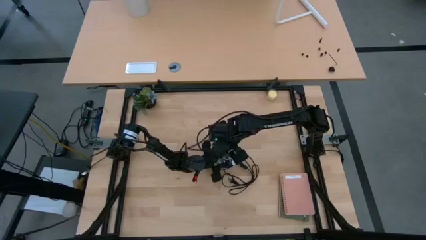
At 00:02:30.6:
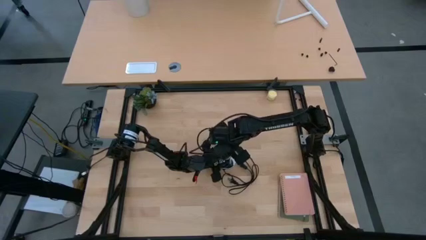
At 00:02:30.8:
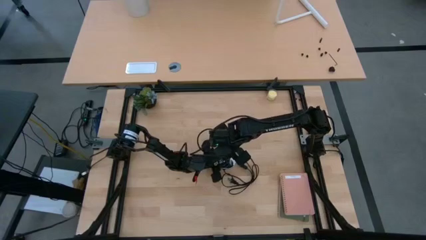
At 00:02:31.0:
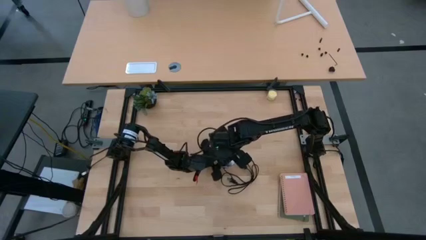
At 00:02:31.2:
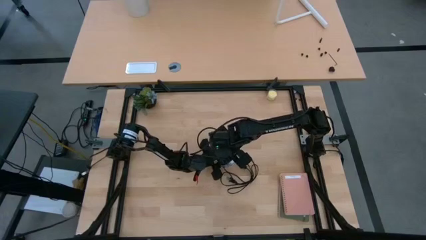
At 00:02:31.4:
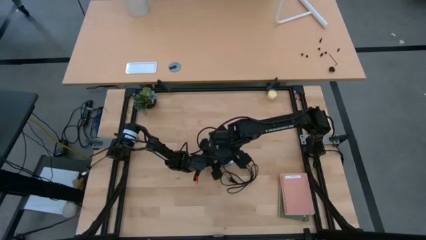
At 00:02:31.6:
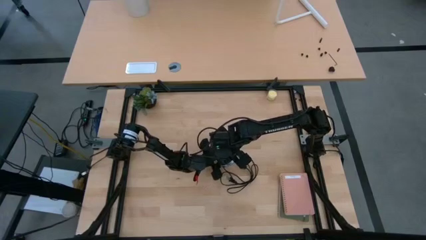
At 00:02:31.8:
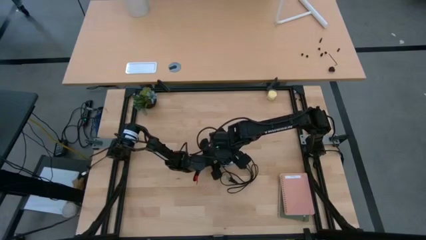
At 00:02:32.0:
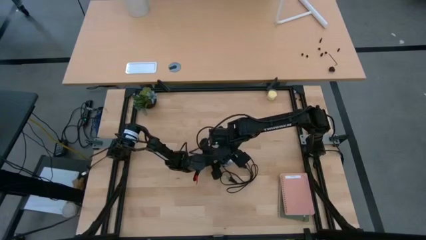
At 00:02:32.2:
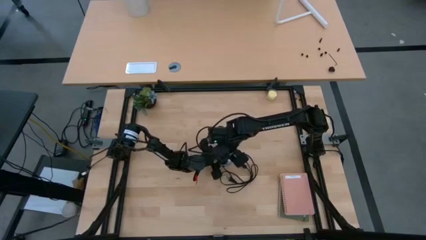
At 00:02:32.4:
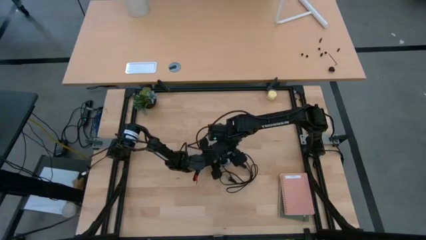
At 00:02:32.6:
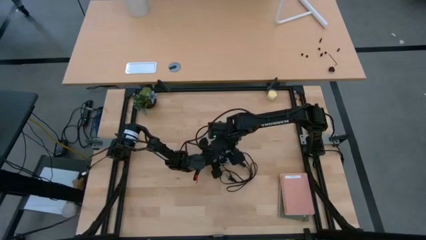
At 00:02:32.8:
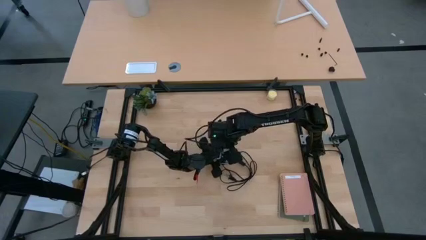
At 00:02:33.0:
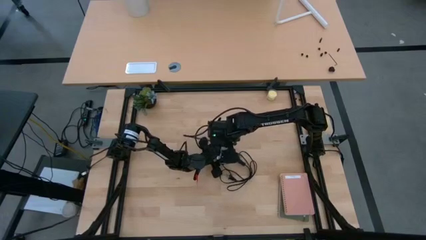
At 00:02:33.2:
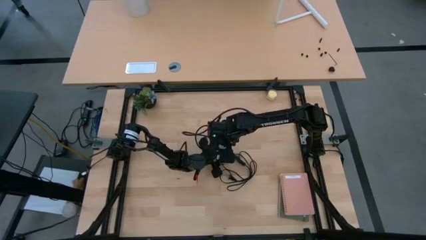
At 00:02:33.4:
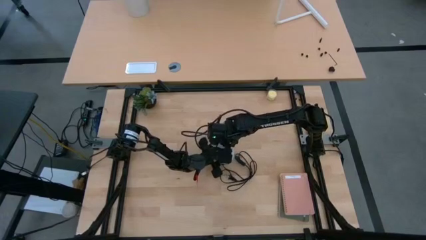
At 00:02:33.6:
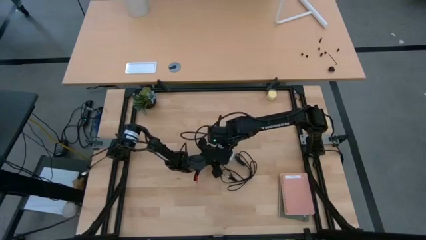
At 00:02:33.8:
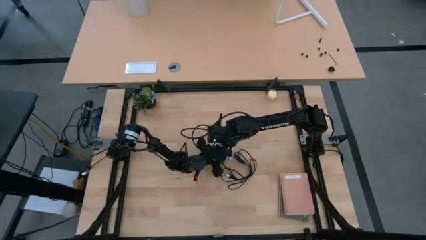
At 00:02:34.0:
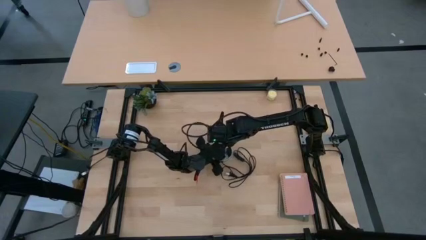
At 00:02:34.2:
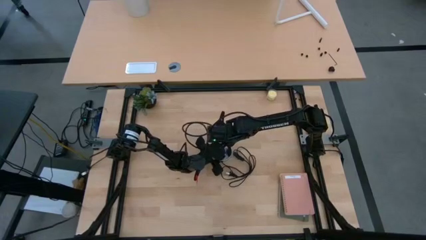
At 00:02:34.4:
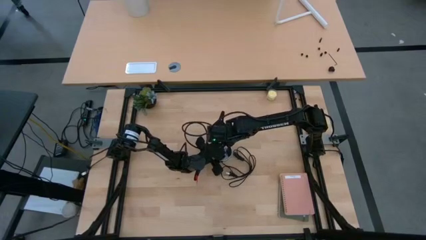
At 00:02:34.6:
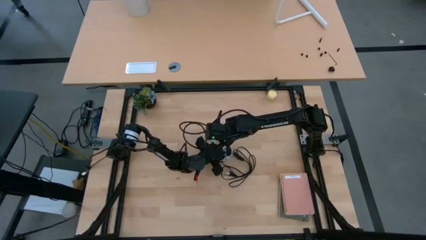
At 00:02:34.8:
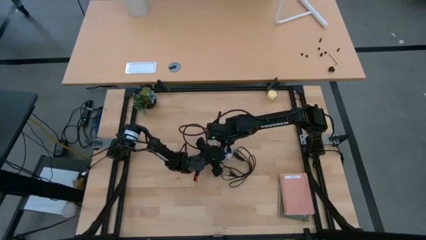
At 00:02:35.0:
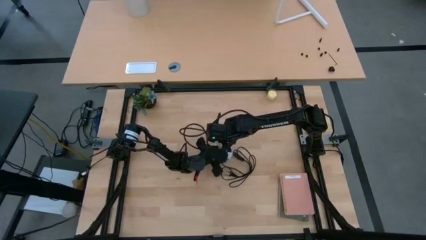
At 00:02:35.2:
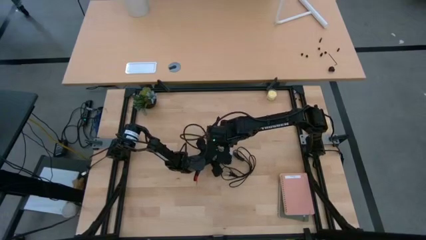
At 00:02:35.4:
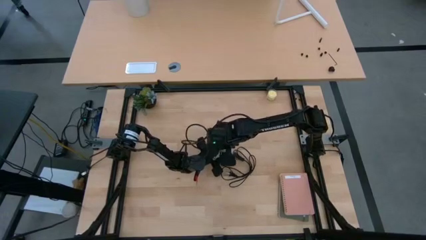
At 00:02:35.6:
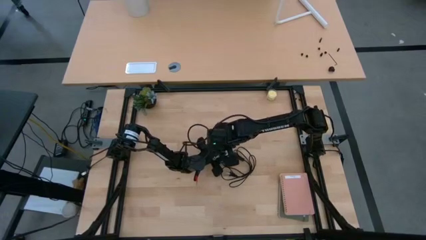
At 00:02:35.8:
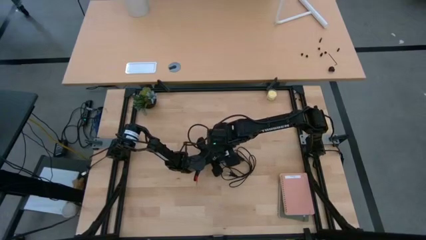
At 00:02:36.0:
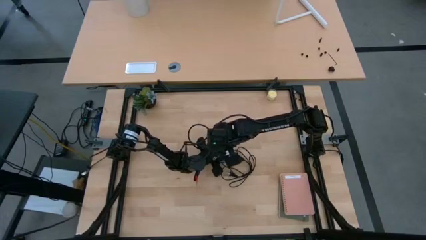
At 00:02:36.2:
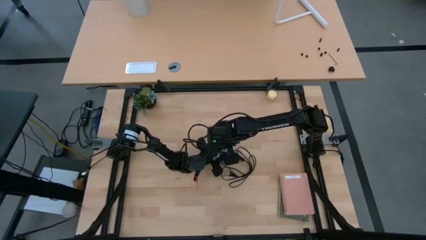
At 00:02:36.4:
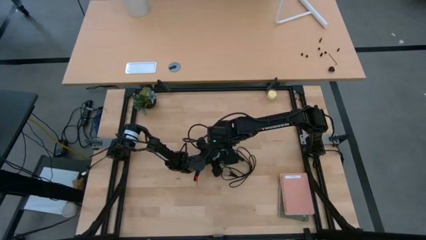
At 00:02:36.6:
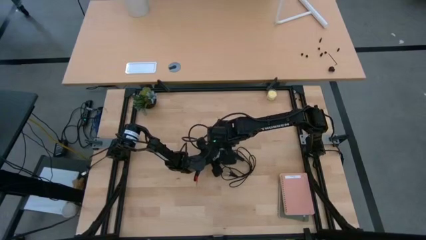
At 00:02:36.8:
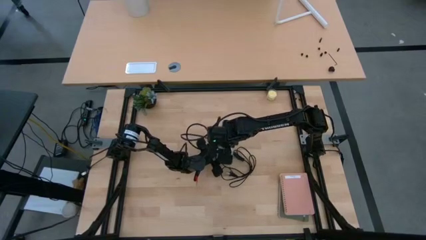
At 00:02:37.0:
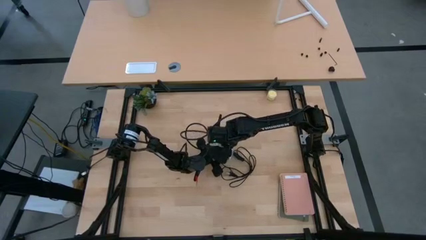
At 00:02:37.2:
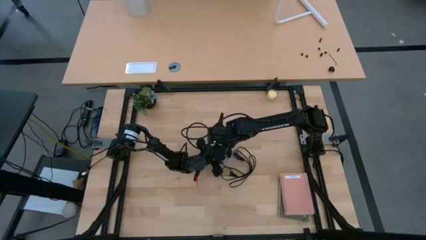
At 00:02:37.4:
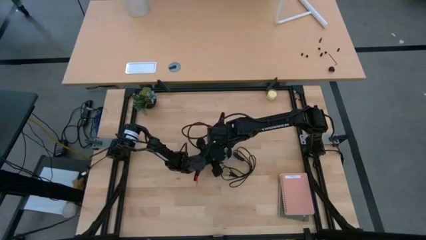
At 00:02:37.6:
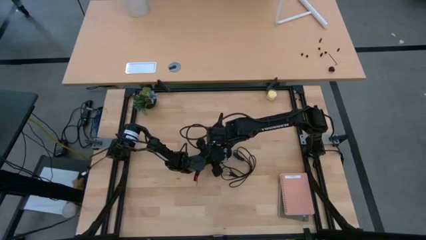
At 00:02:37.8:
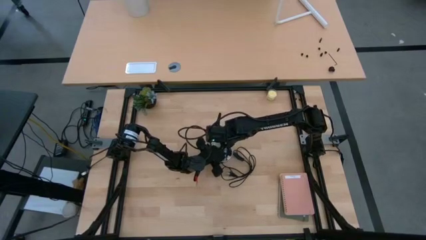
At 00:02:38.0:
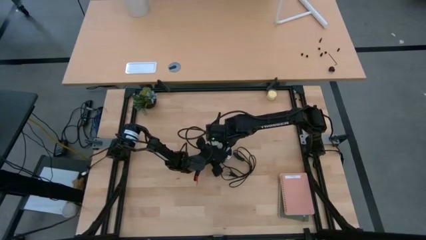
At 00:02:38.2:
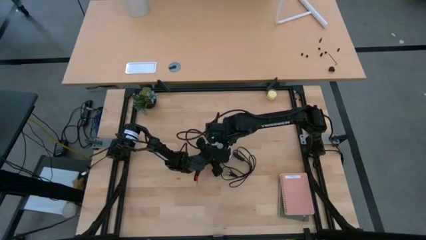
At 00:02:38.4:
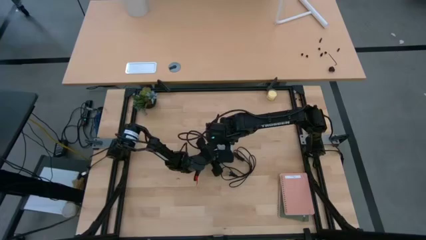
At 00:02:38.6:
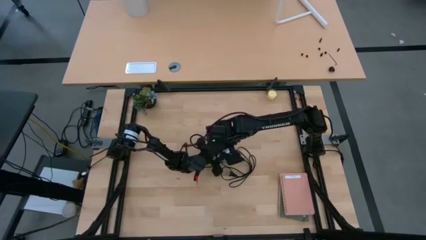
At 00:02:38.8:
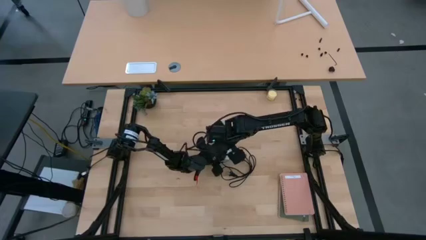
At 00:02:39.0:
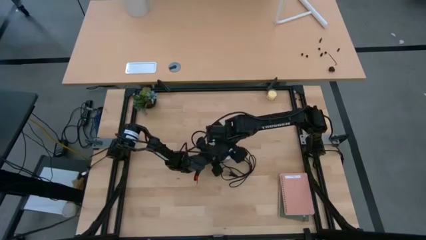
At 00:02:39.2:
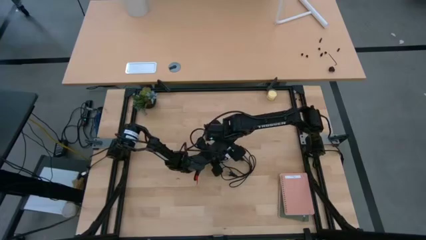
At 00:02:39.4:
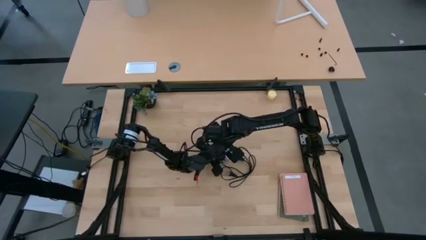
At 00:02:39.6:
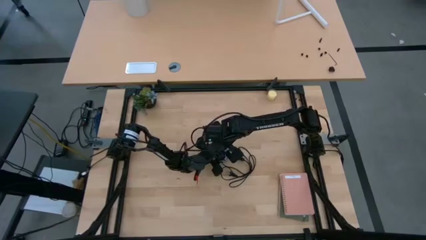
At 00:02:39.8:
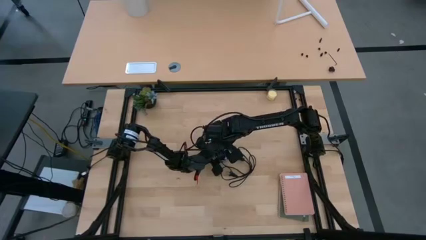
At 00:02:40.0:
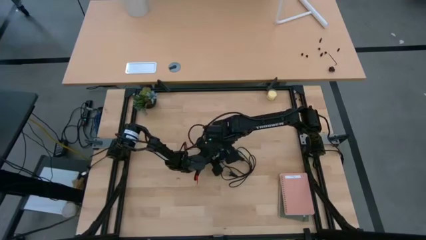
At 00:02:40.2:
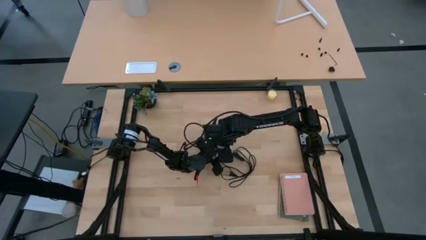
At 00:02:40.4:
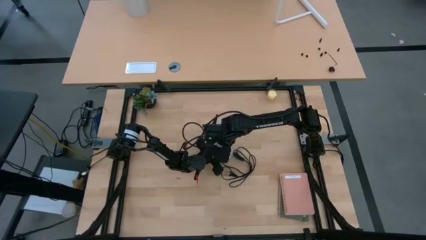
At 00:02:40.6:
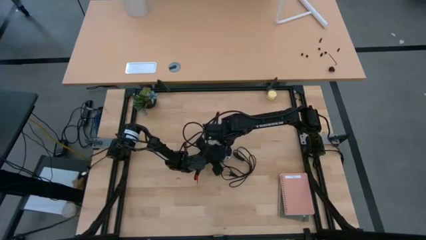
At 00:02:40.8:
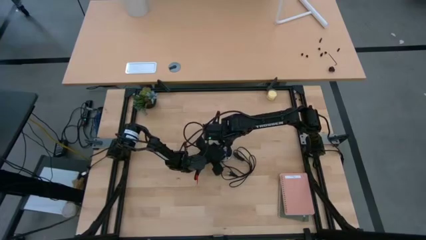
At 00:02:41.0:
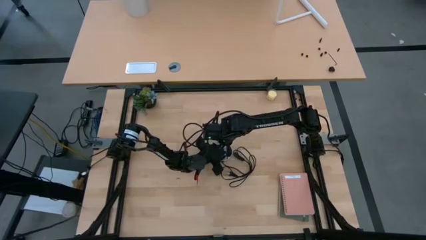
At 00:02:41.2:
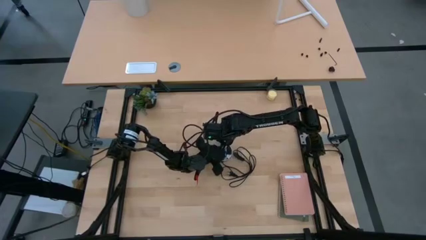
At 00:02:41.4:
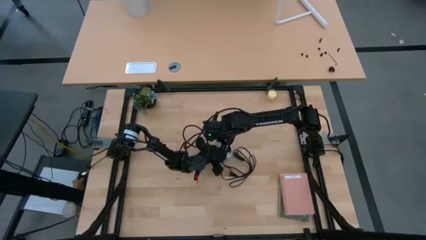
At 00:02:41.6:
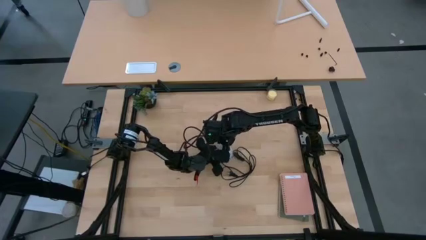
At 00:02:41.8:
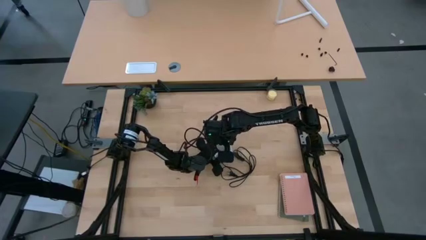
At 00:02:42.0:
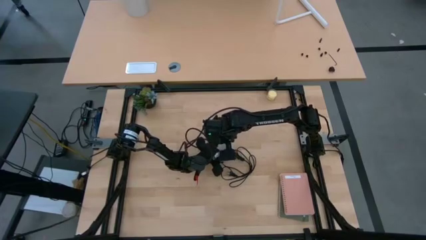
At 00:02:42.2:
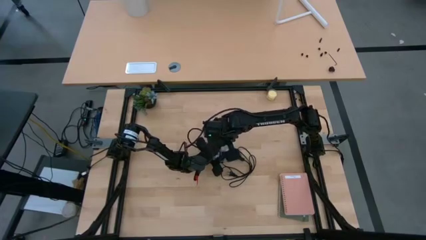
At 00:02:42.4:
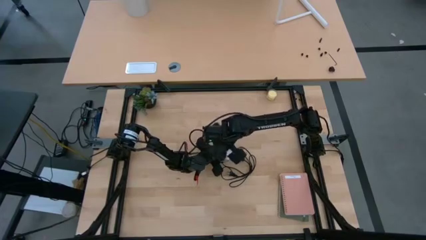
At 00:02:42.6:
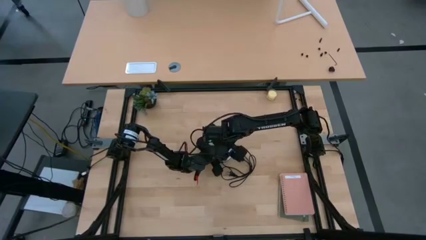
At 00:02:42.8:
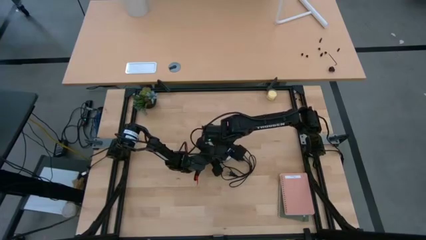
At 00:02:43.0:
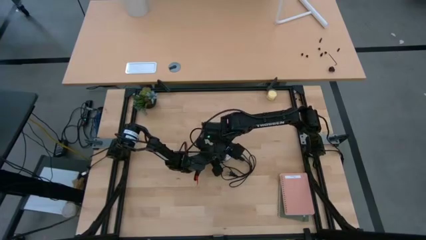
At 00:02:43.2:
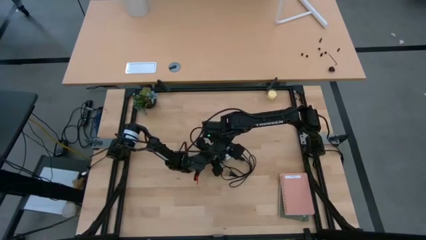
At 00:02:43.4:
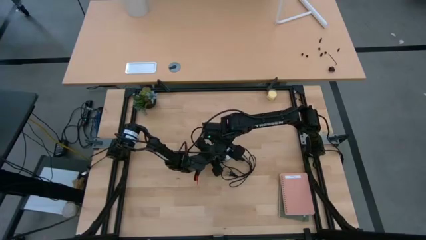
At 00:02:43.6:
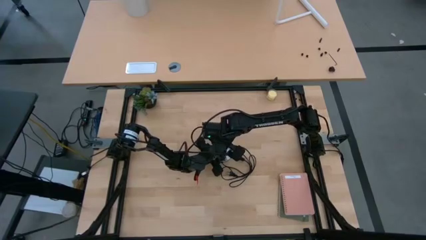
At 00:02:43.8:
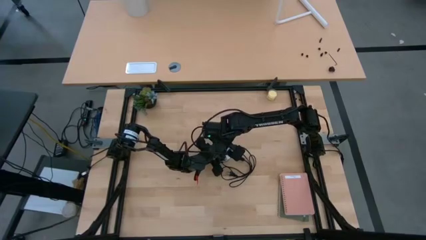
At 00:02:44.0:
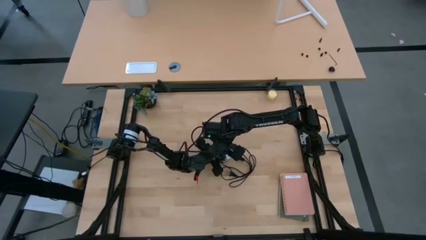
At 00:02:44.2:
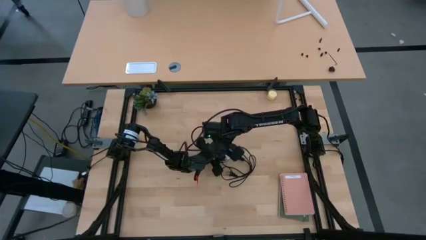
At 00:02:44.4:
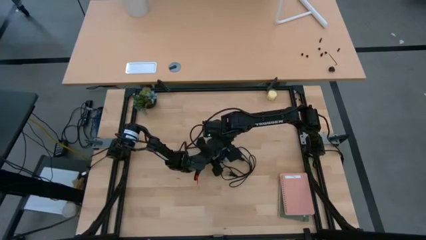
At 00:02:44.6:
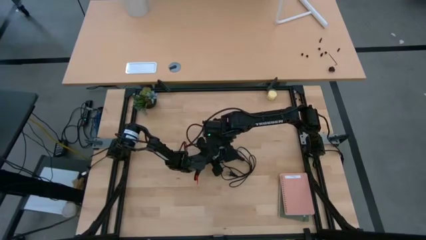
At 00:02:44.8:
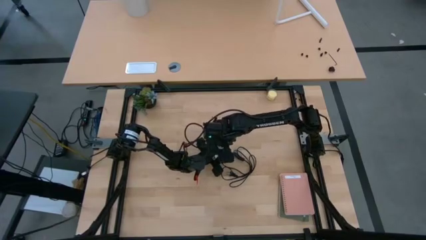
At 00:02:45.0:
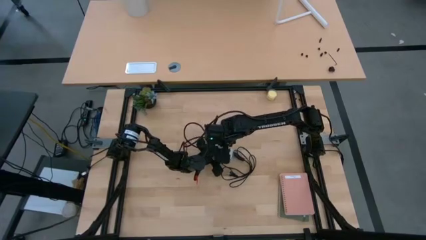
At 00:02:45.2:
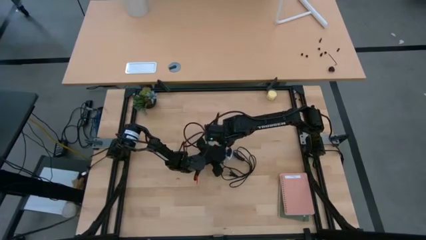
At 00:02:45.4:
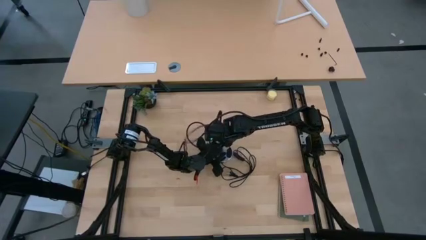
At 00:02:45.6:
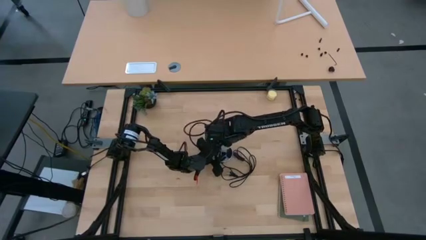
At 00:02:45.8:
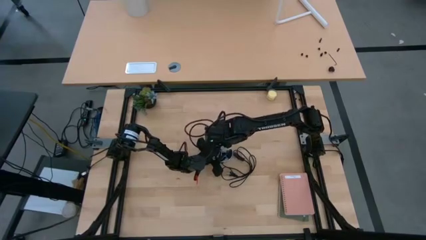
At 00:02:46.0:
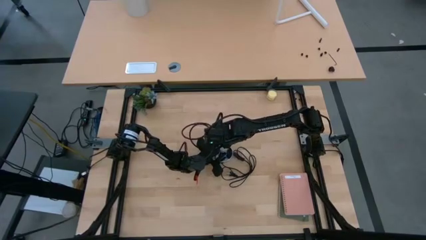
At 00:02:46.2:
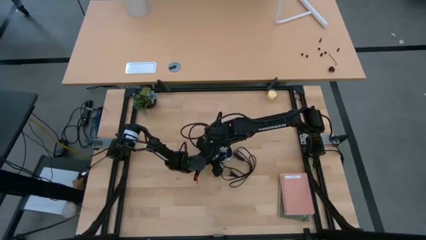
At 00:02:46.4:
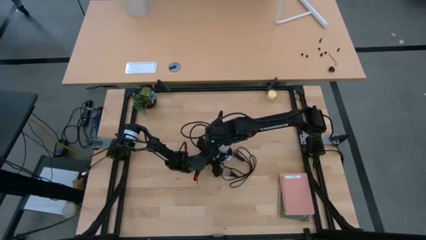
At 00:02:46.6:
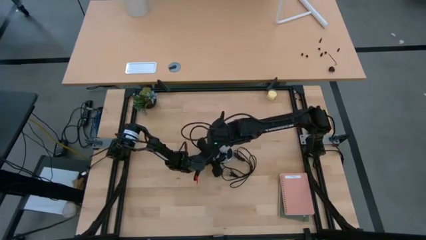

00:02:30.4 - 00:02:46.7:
Task: Screw lightbulb
Insert the lightbulb into the lamp
